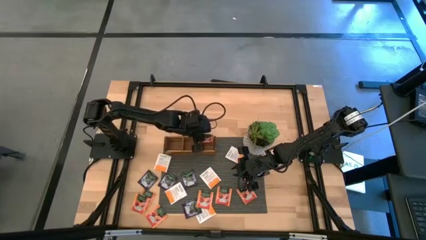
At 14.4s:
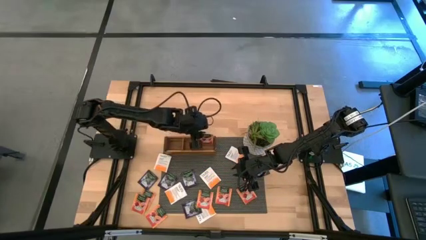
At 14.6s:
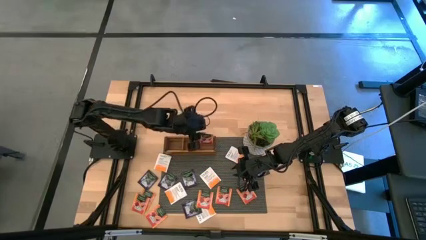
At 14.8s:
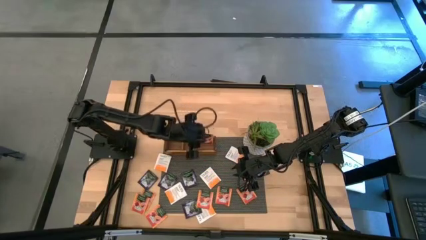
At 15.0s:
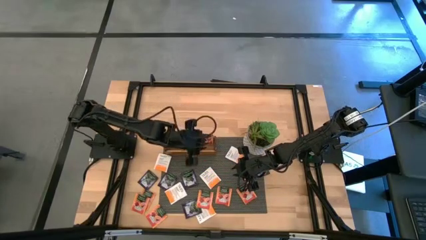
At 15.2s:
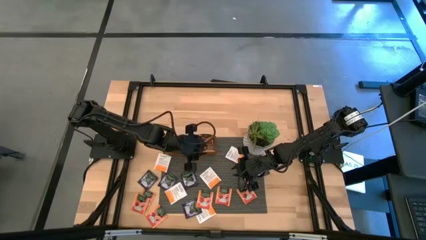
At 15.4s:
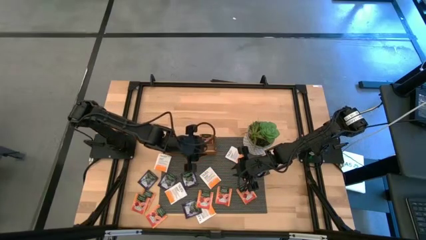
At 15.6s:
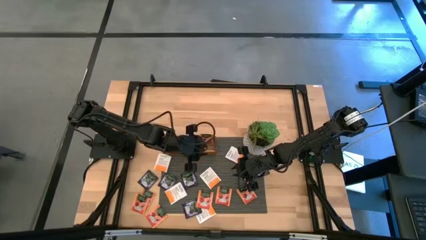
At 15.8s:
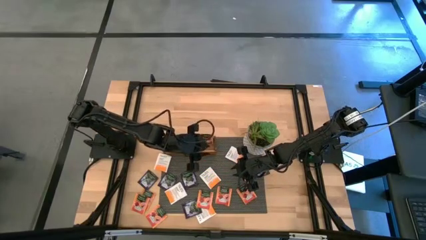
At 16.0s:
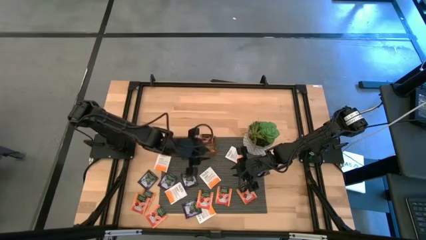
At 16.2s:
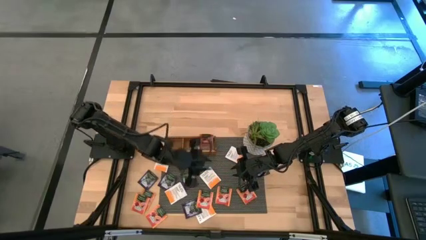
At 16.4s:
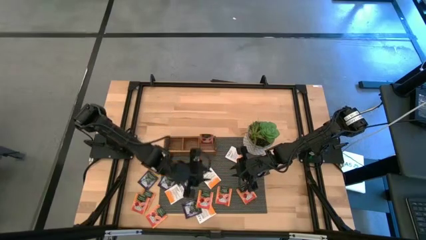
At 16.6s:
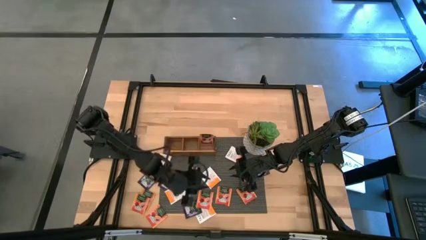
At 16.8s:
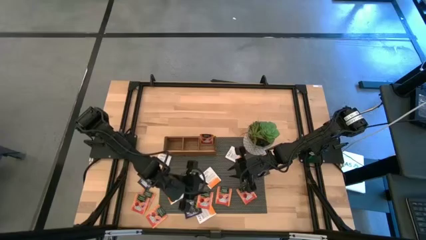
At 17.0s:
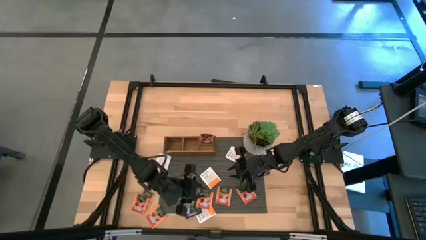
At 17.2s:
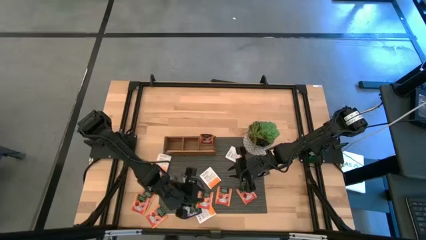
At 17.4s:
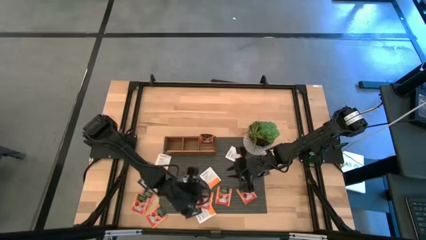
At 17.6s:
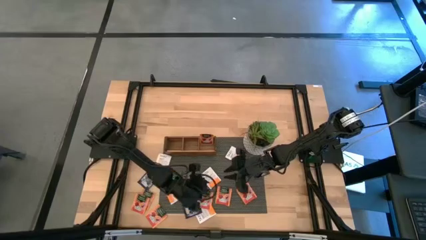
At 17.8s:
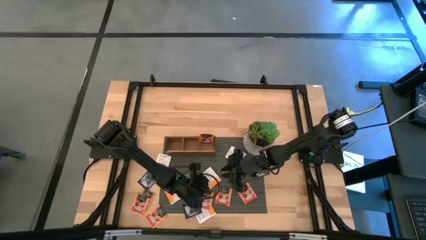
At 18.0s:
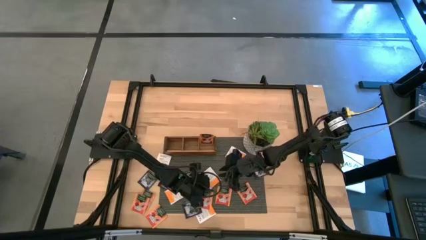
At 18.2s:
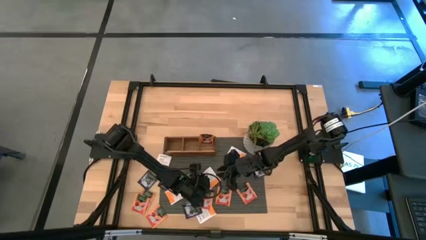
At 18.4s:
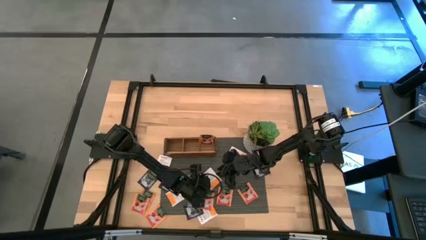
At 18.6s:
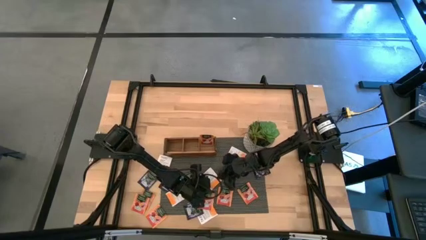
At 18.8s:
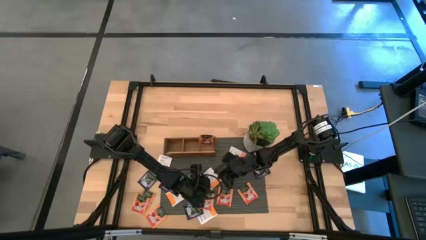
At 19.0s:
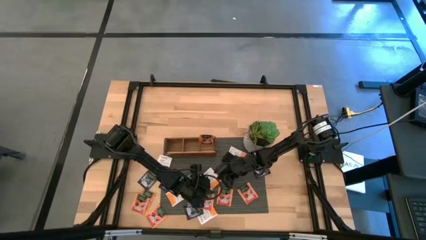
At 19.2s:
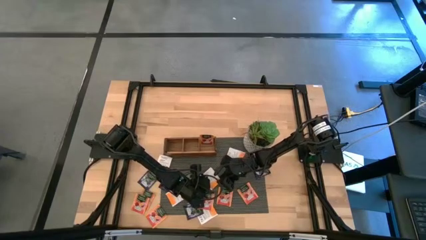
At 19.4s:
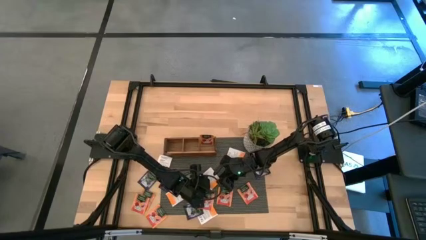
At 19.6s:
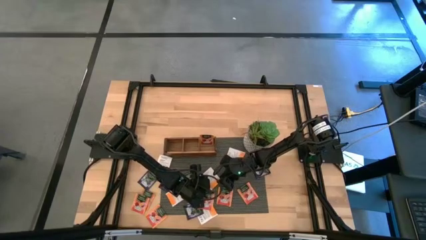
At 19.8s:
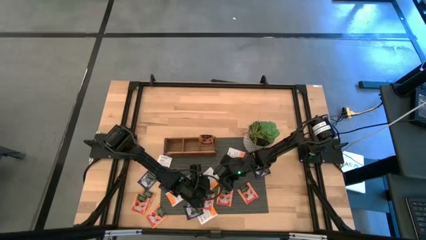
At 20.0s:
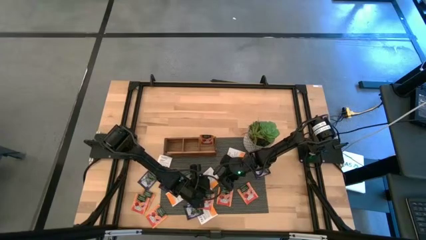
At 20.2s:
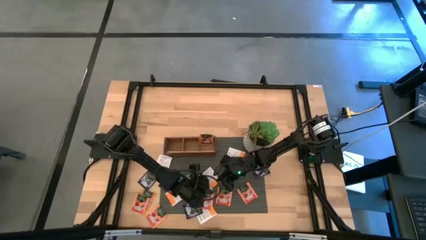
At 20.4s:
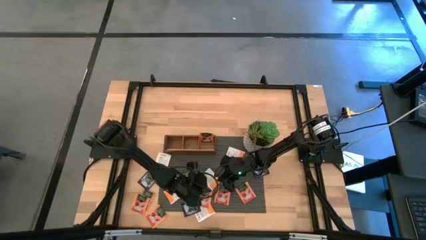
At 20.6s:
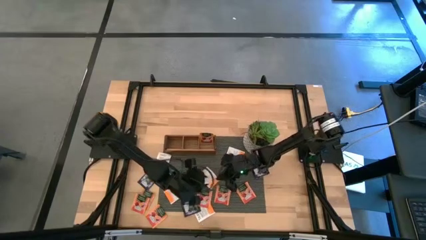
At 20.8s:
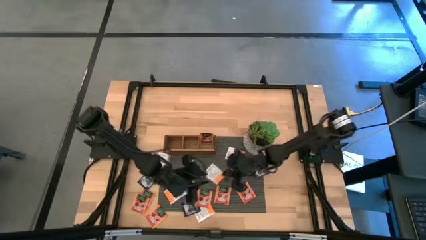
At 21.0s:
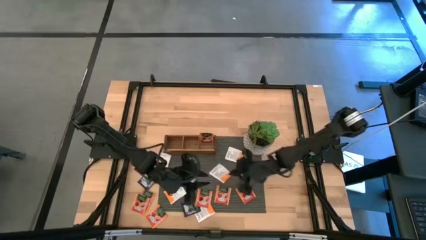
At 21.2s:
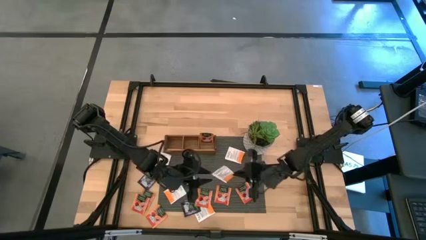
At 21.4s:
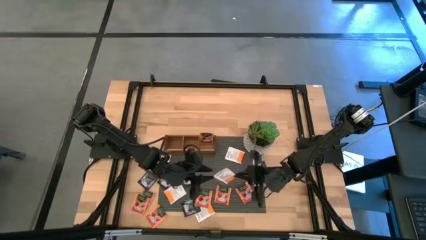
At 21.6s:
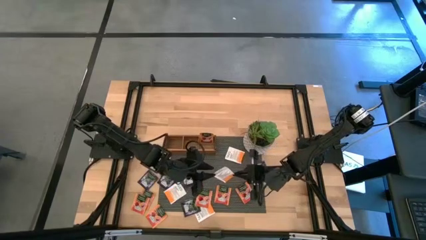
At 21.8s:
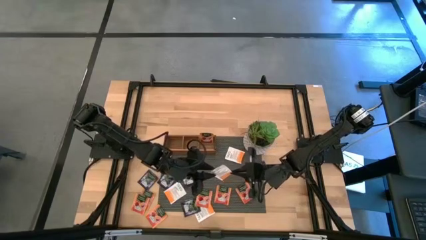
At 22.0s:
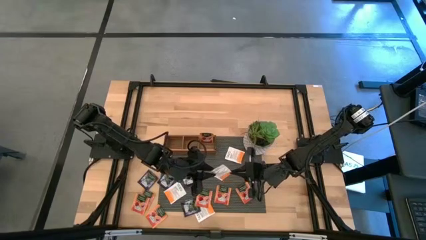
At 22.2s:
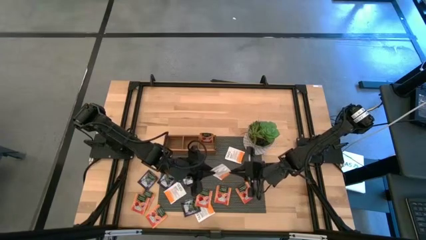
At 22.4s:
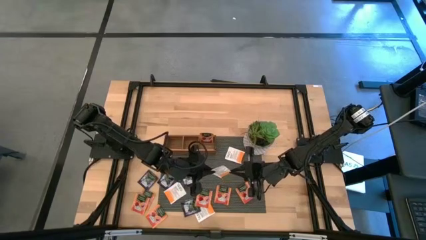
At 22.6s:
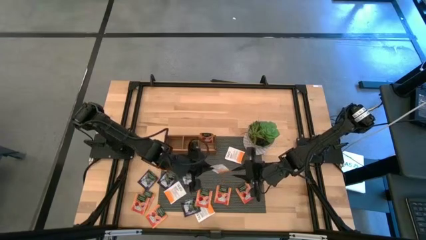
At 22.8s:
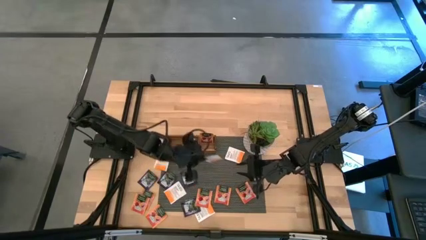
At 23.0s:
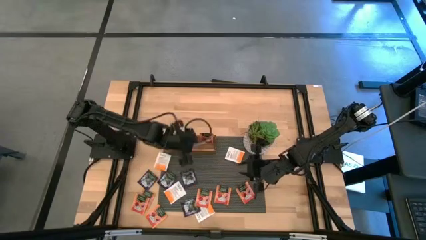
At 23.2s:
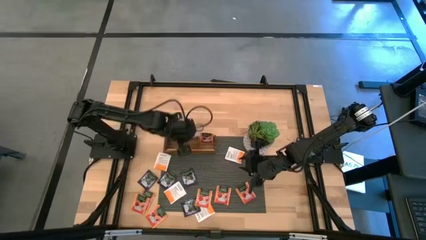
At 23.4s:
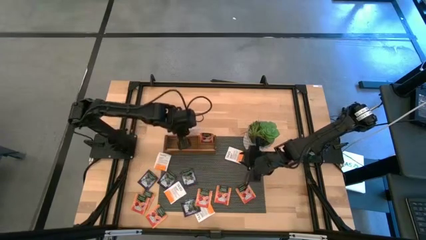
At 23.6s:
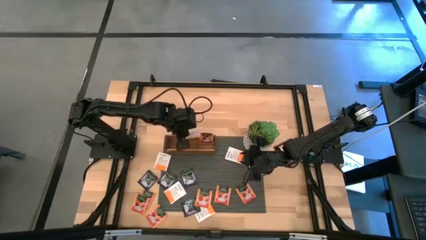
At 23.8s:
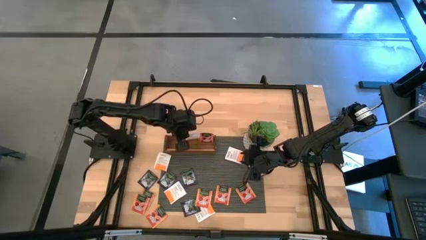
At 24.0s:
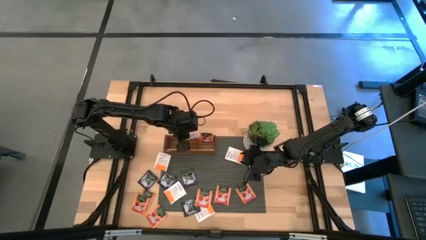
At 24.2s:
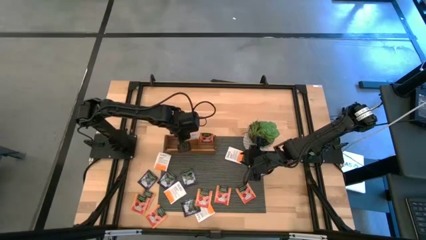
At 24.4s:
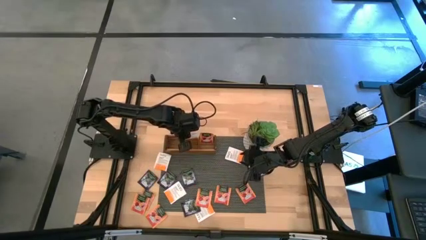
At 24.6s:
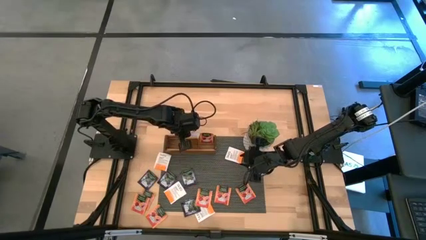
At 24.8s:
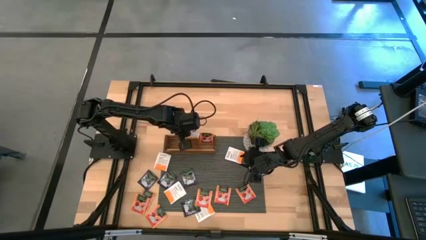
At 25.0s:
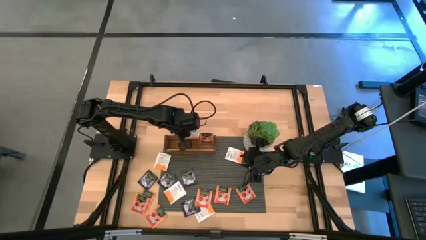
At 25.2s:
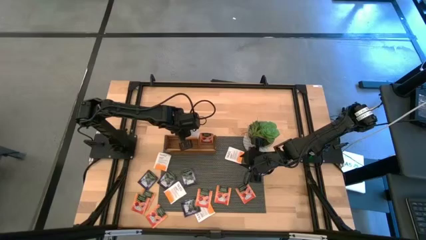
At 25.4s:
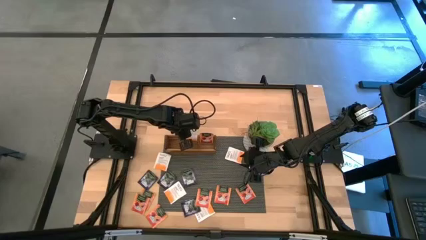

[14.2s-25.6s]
Task: Pick & Place Tea
Put the white tea bag to the middle section of the wooden organizer

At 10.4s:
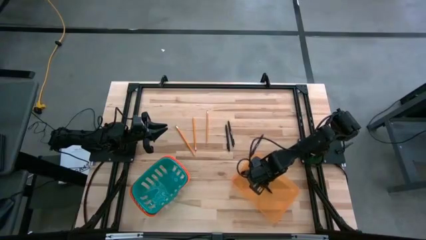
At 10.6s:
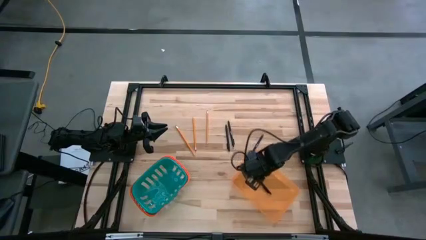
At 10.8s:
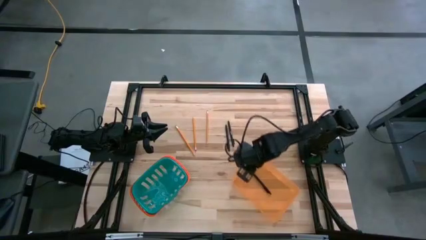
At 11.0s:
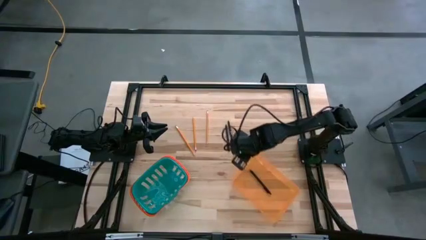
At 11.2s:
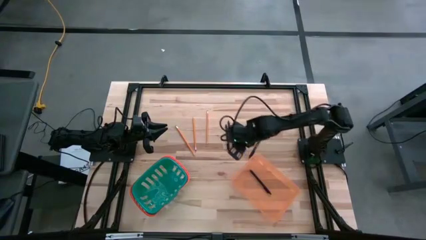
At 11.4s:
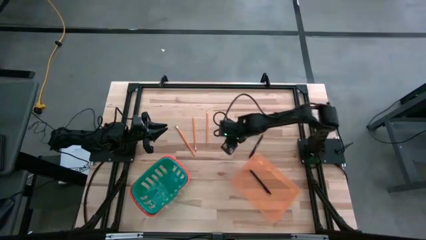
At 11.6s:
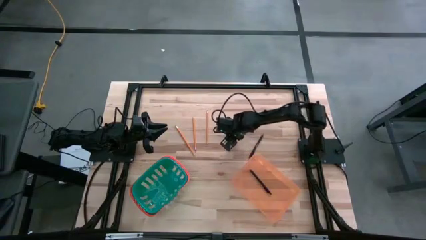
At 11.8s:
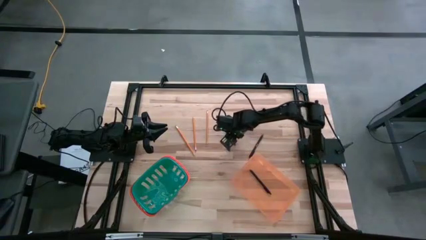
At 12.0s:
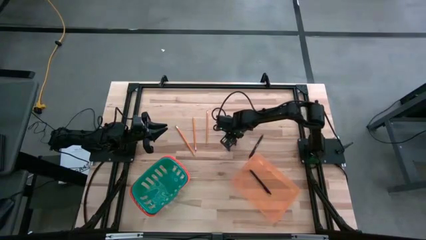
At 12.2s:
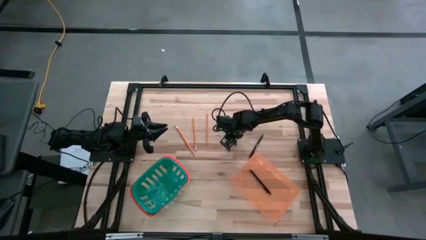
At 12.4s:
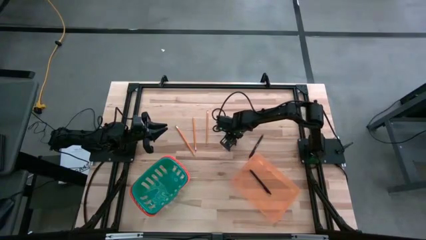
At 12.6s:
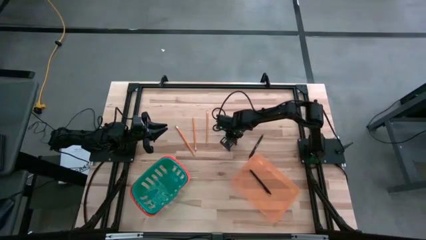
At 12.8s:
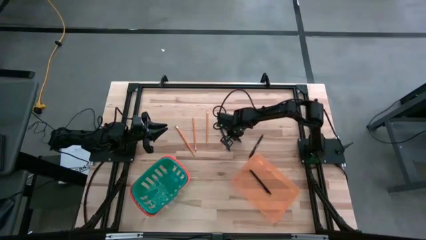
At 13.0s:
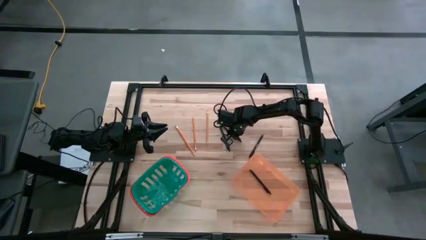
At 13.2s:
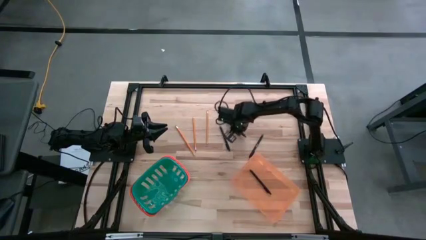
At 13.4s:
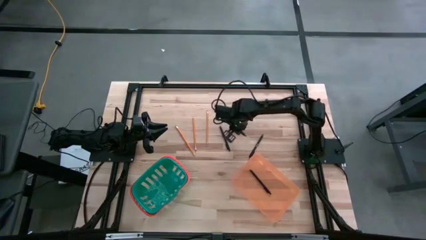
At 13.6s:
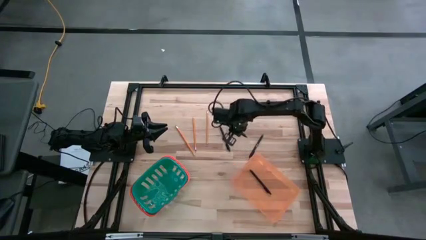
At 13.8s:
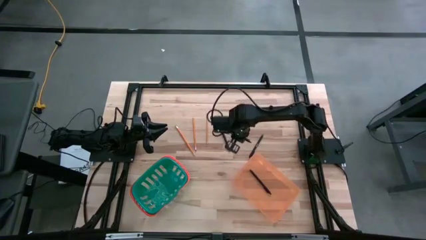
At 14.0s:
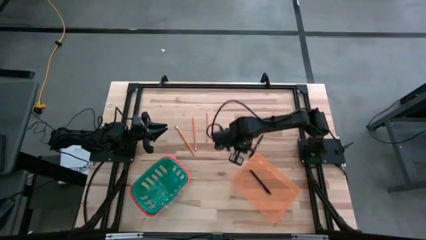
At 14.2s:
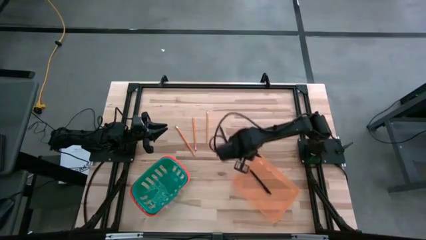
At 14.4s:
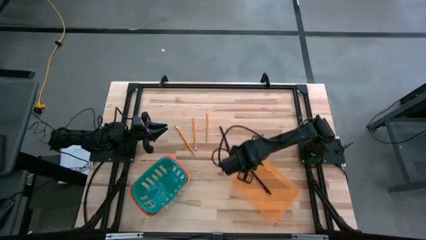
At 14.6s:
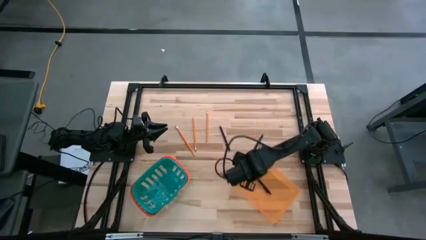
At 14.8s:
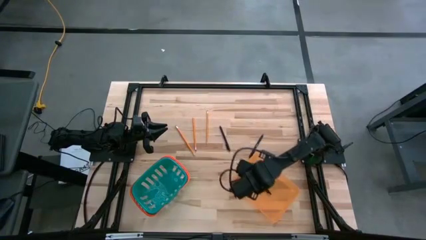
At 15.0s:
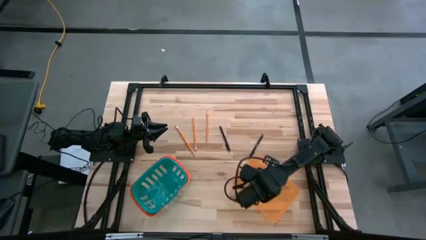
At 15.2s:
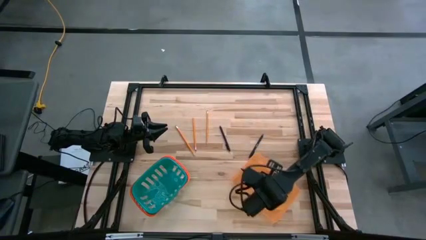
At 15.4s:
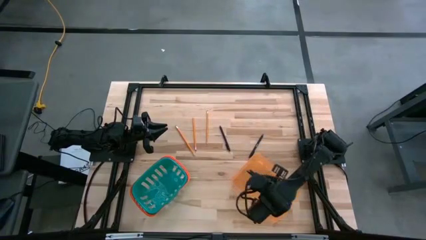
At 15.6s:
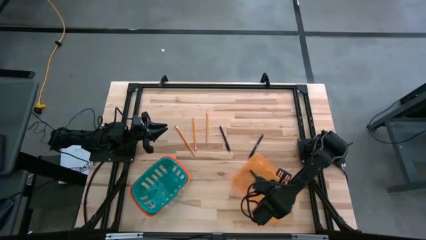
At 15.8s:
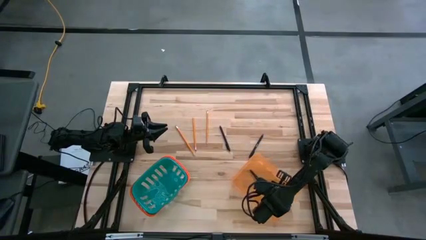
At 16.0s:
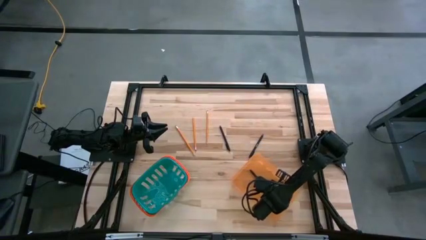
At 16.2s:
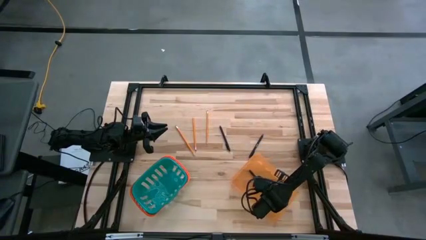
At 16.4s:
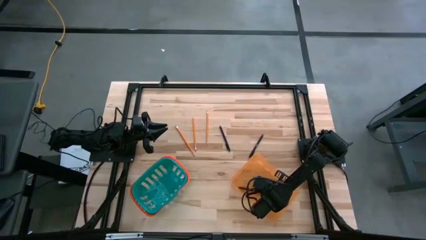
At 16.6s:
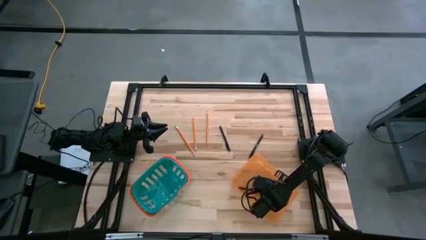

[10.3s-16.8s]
Task: Sort pens & pencils
Put the black pen into the orange bin
